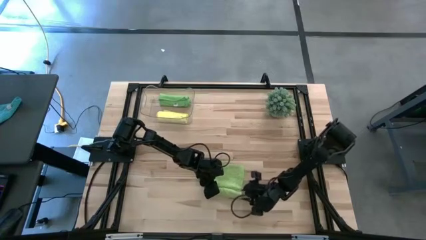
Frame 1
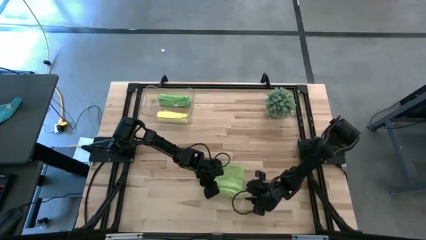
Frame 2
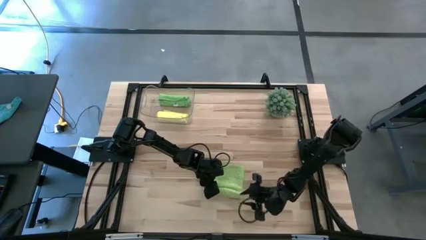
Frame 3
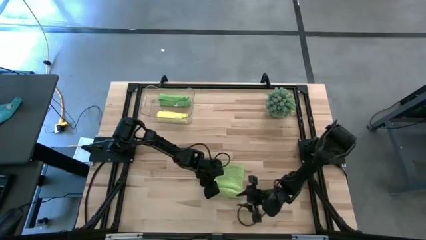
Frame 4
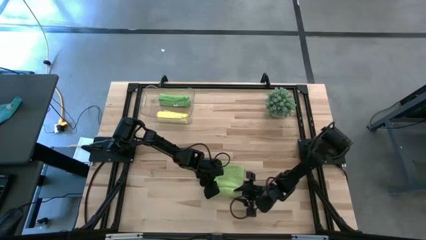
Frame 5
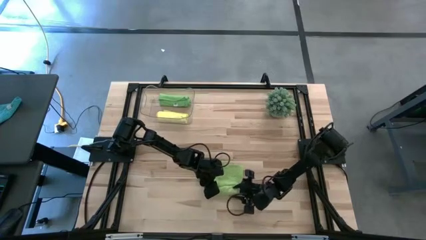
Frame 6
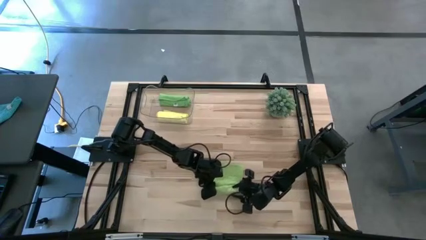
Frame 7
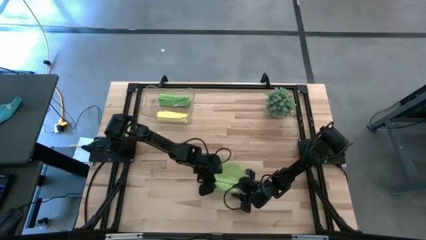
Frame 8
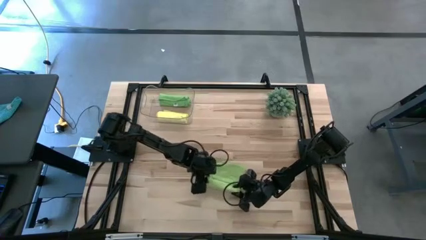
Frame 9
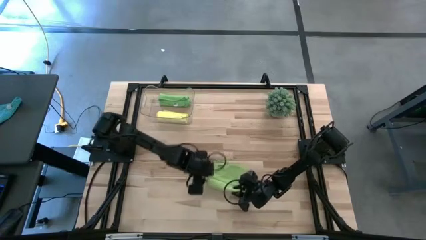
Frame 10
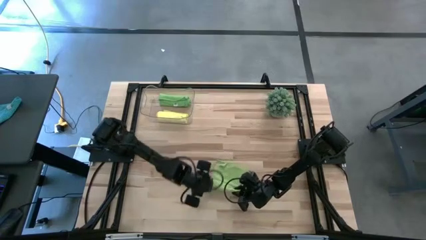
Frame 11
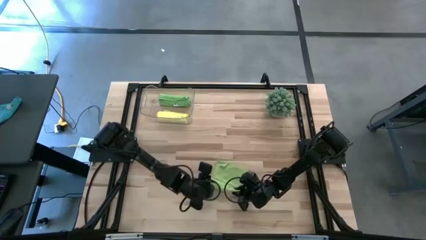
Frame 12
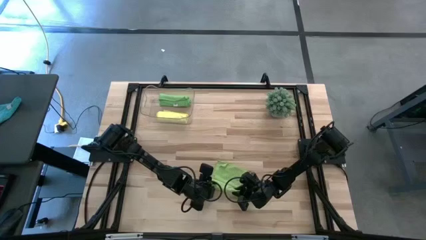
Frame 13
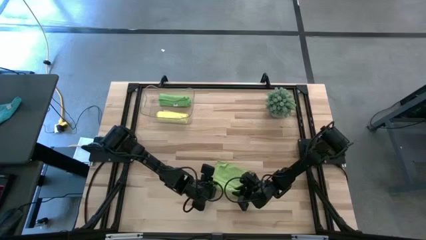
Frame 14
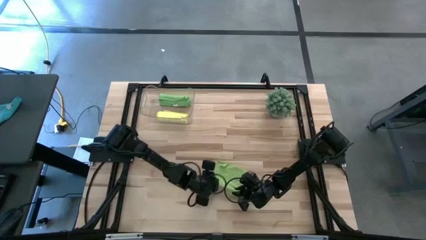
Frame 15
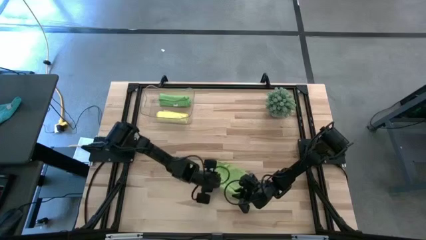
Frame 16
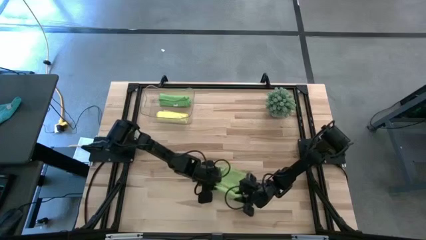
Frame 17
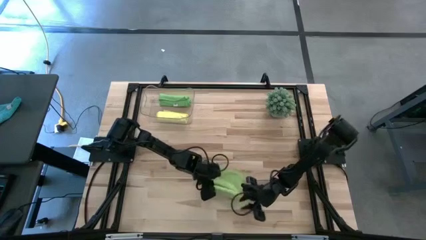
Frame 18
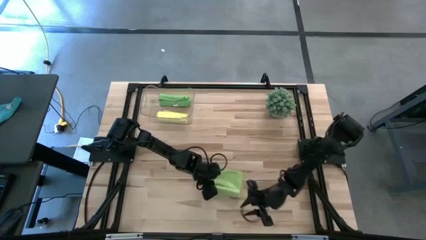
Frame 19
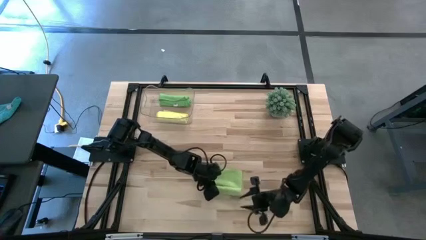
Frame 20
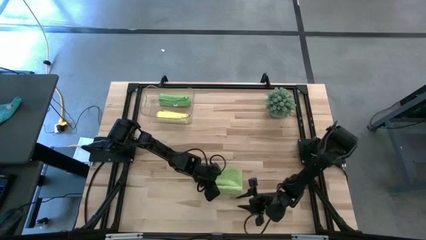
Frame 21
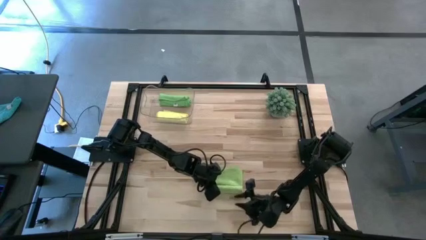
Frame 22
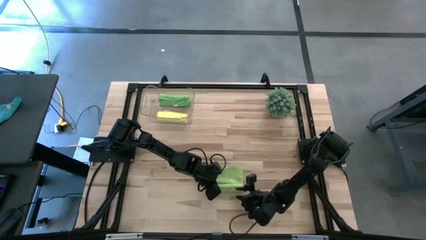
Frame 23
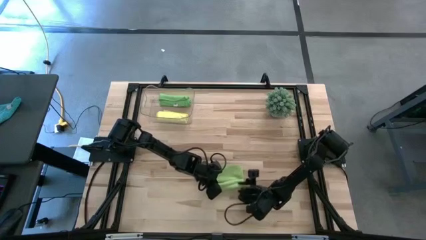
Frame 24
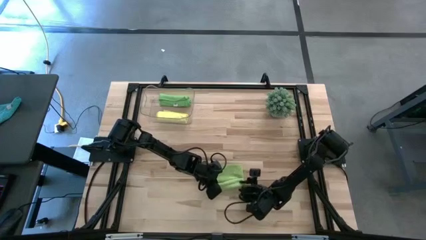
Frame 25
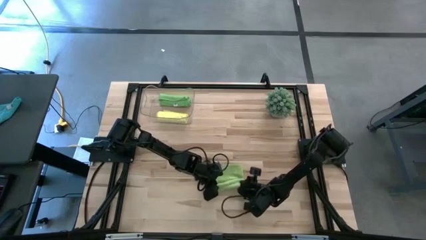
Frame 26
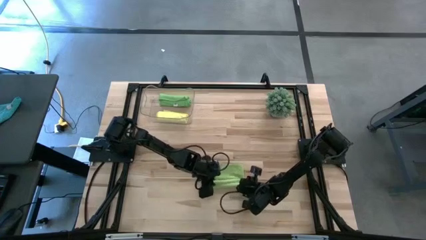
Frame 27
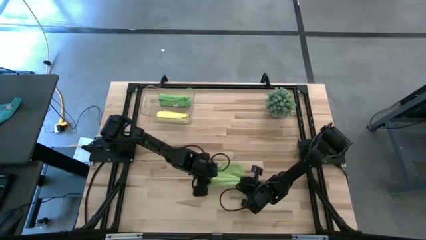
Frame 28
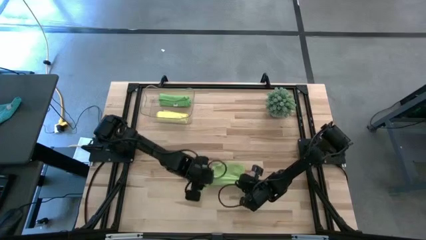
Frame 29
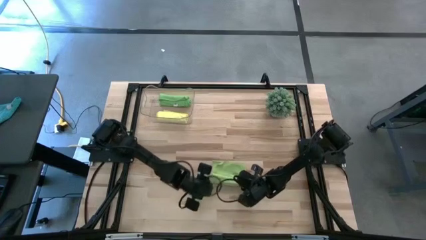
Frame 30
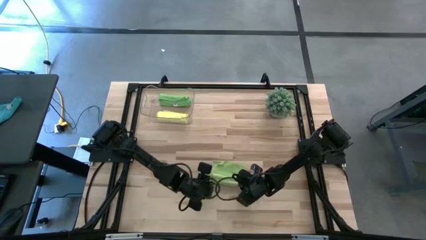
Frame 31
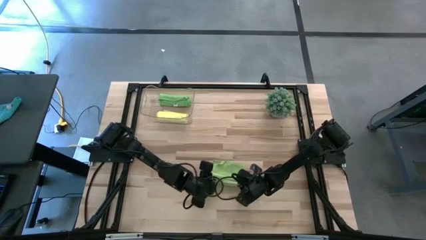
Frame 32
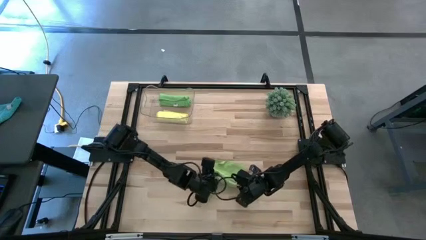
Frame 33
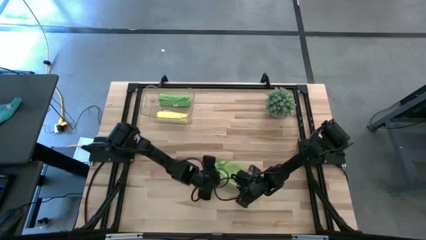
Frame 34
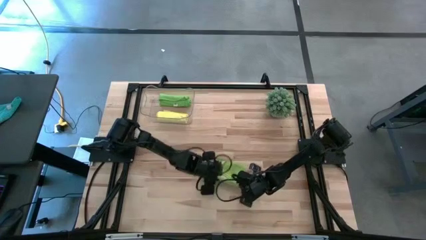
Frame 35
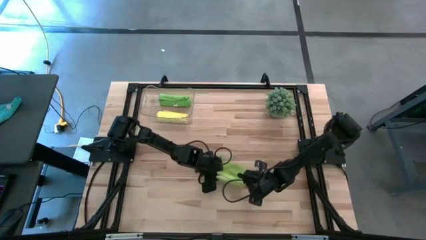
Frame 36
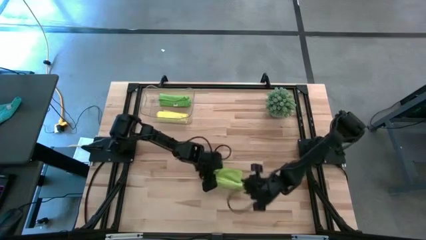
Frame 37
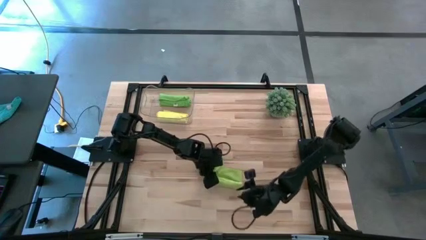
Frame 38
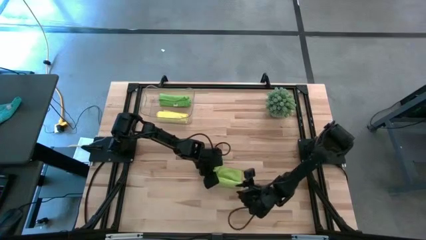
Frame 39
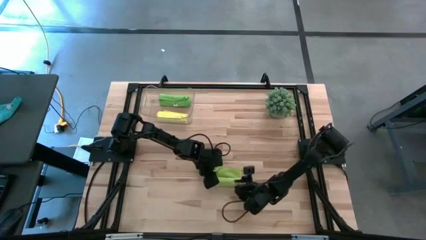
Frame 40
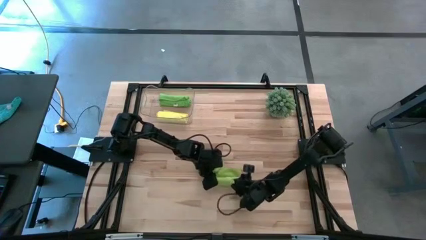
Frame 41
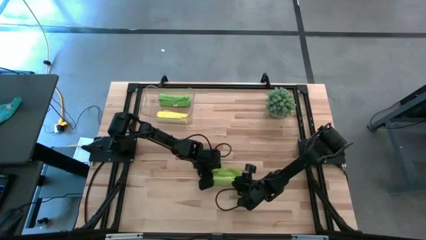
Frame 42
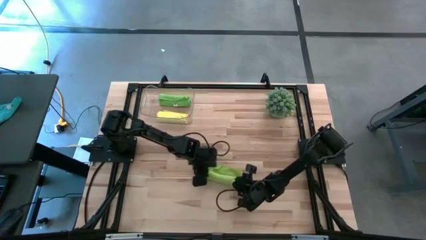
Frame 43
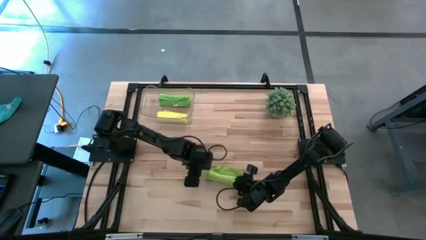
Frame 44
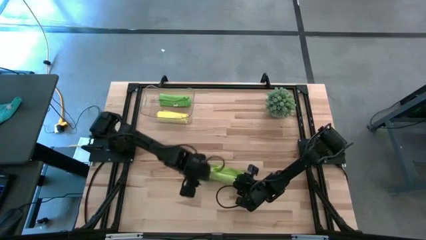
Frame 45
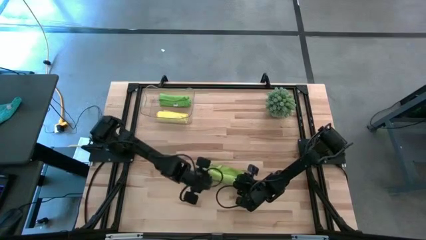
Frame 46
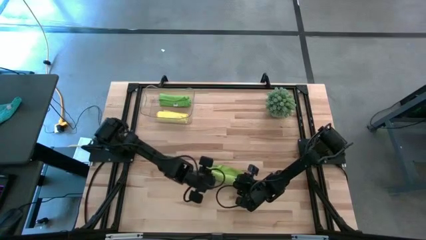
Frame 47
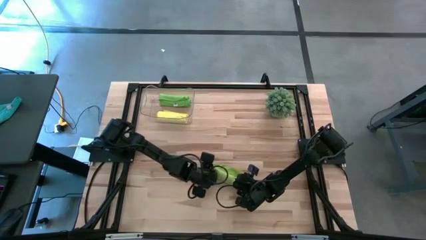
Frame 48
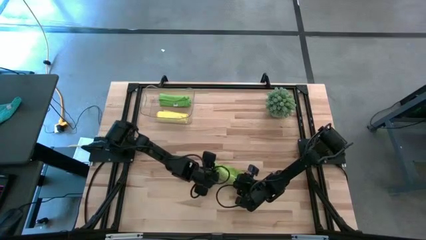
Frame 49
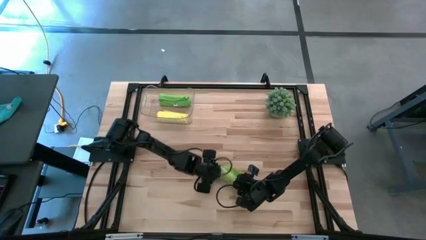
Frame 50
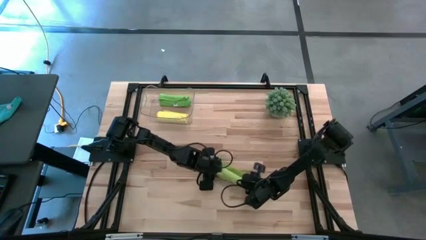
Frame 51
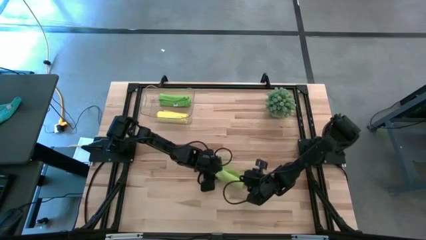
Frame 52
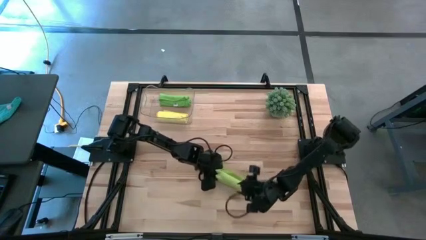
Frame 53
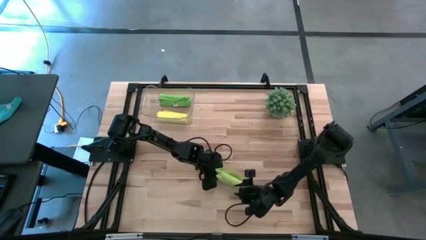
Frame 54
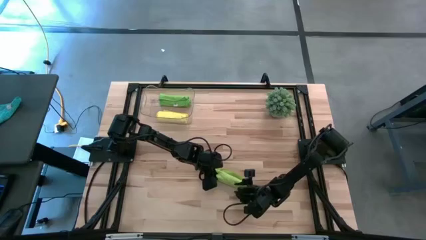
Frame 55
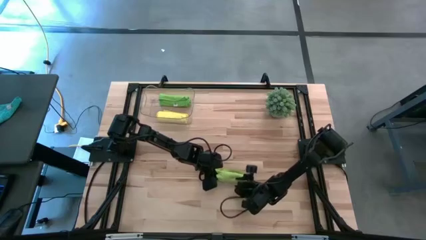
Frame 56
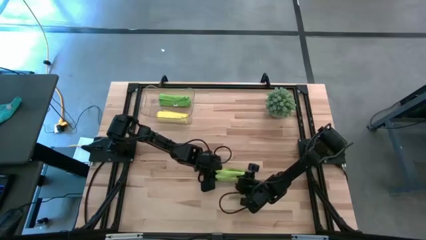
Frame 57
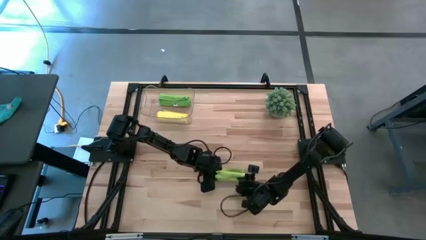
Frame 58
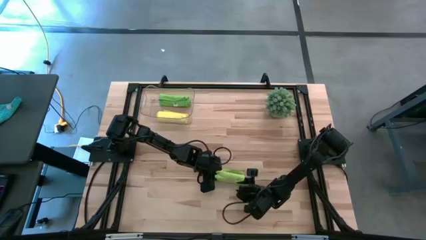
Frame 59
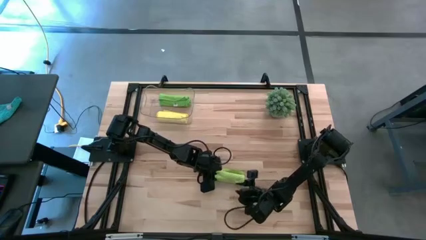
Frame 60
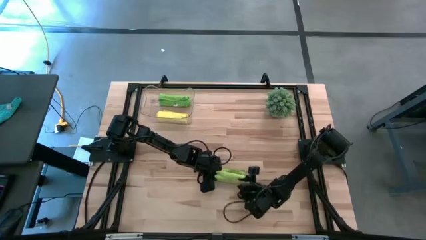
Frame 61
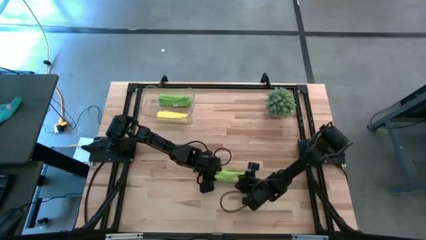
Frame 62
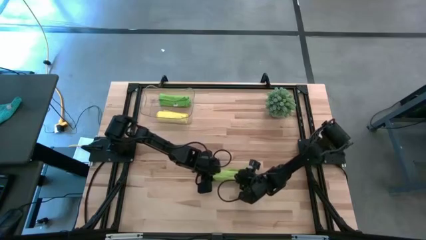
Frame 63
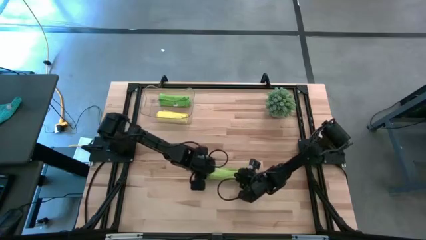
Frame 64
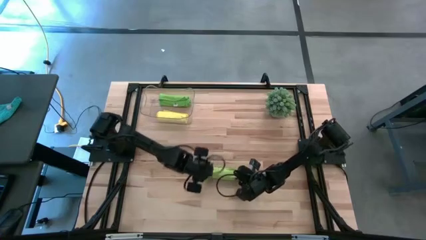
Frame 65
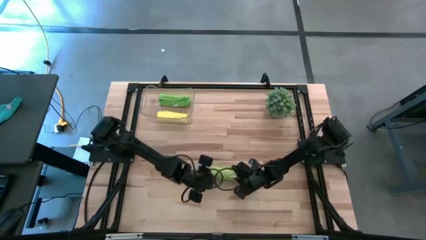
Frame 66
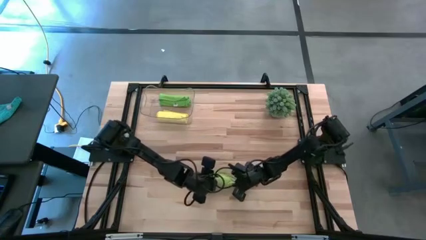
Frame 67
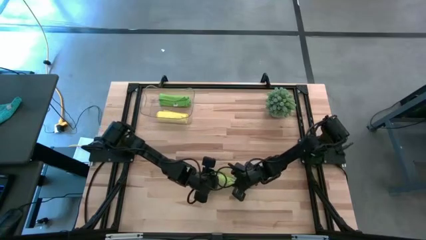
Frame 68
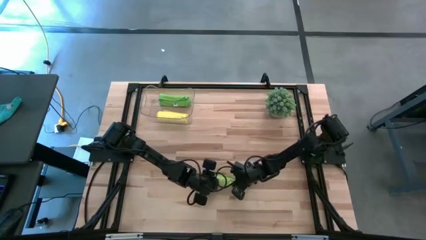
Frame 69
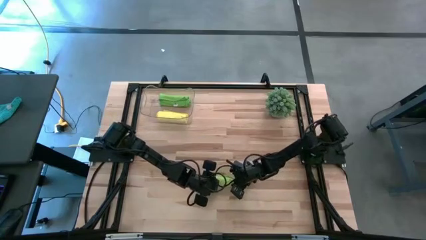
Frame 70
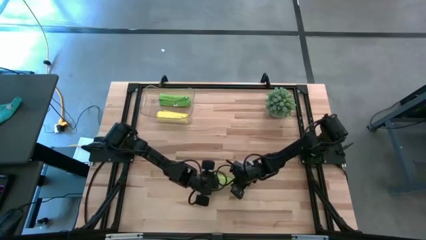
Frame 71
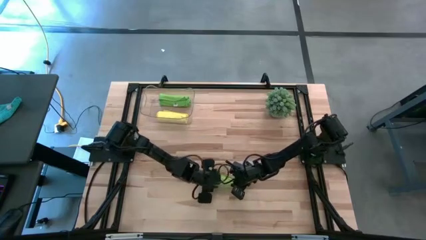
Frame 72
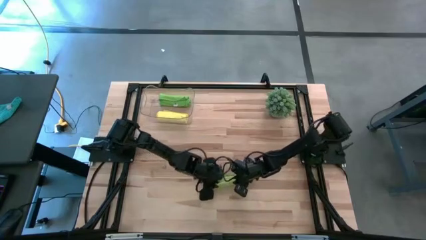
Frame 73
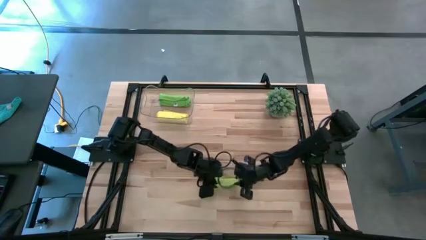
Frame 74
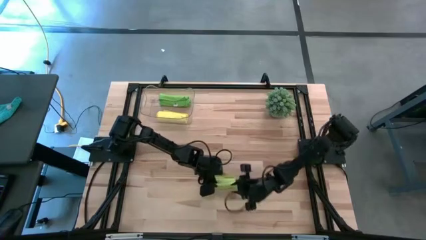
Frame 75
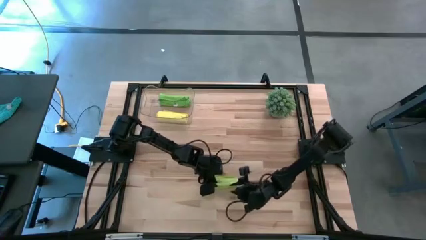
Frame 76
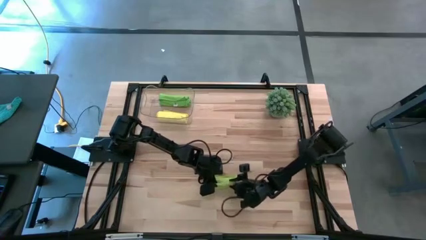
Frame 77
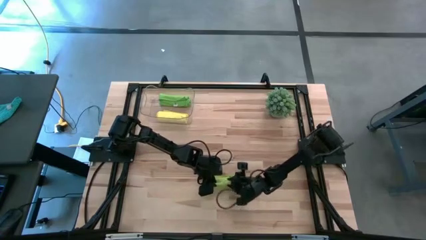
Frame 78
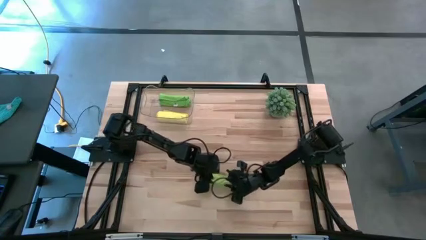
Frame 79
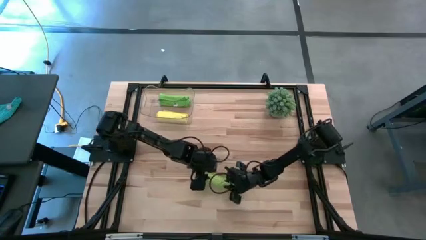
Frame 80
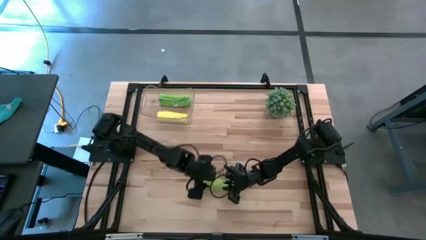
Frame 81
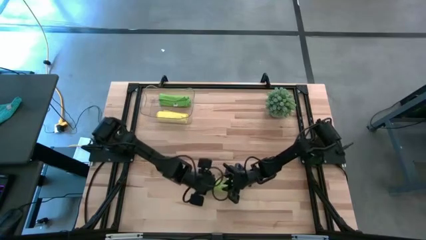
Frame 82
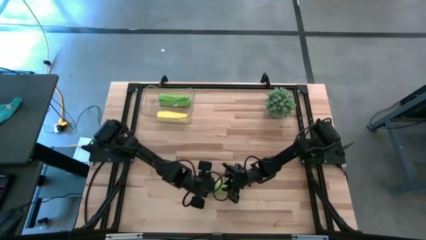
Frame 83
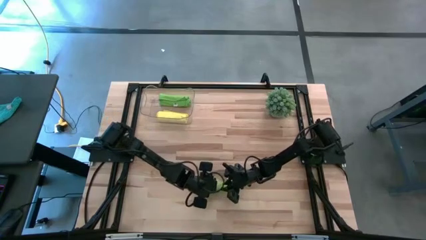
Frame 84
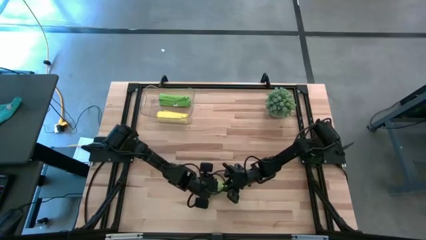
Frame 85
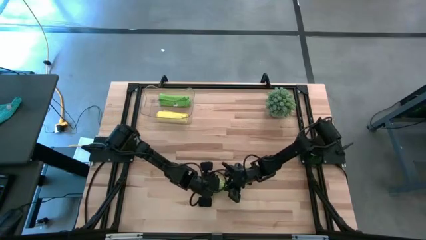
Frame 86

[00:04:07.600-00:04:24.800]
Task: Roll microfiber towels into tight, uniform cylinder then place into a basket
Roll the light green microfiber cloth
